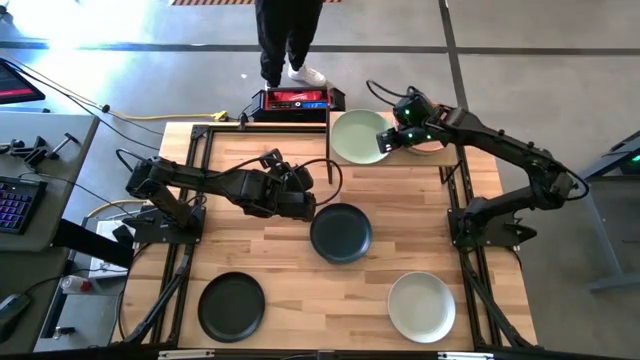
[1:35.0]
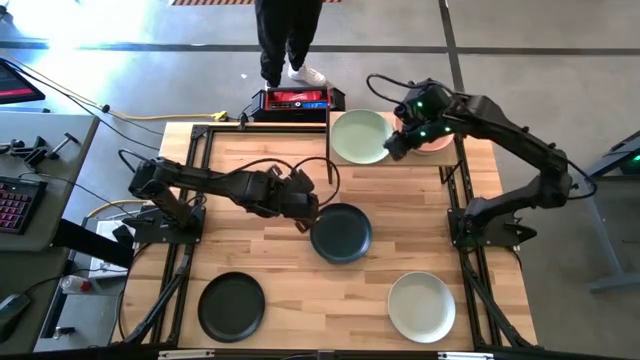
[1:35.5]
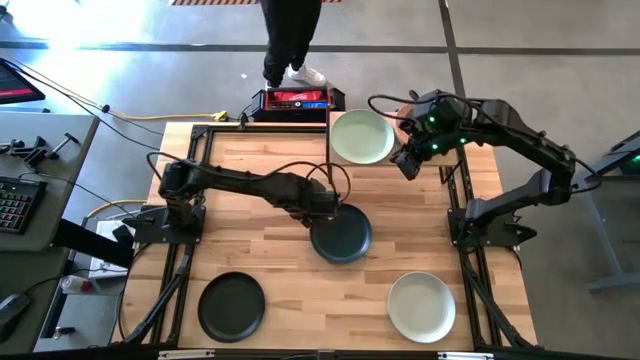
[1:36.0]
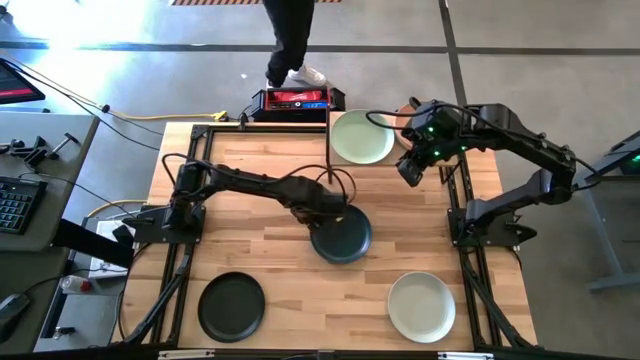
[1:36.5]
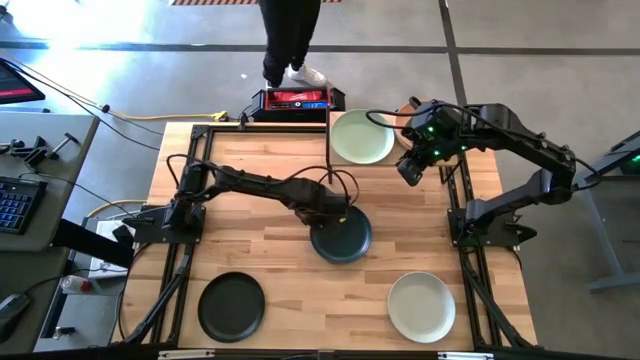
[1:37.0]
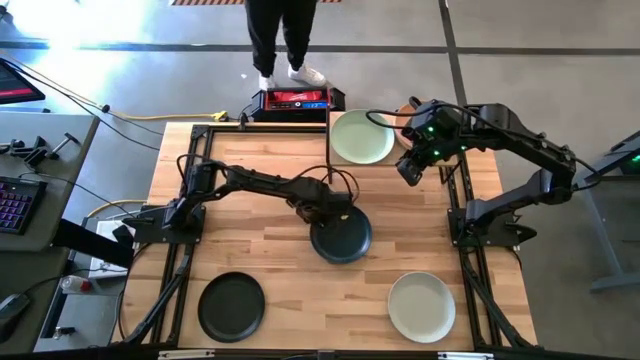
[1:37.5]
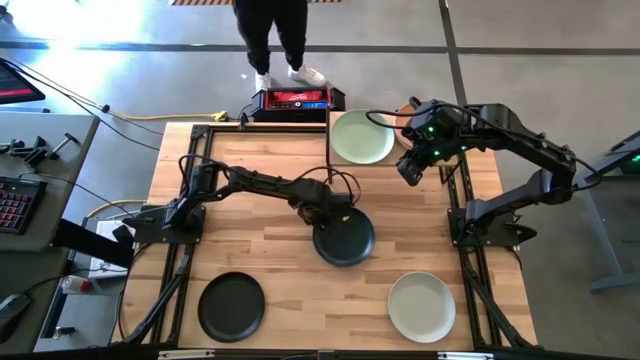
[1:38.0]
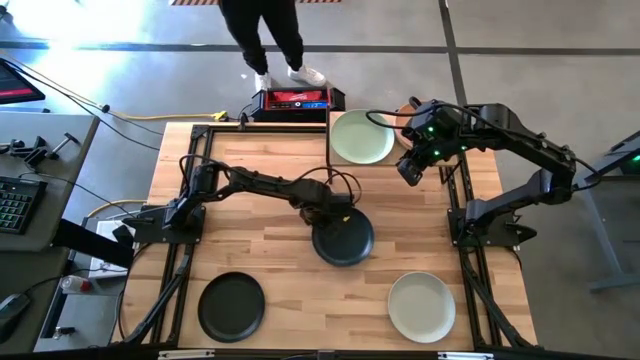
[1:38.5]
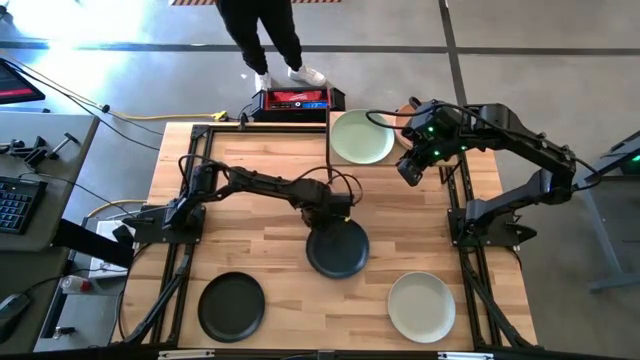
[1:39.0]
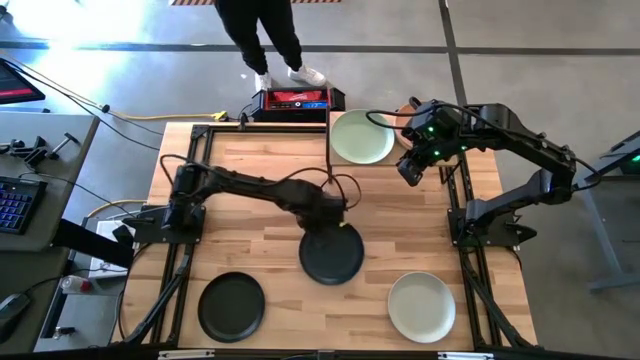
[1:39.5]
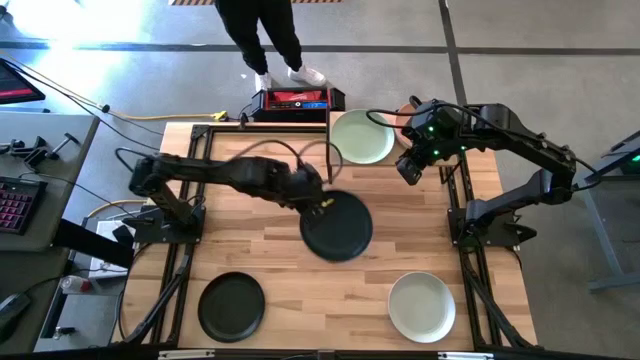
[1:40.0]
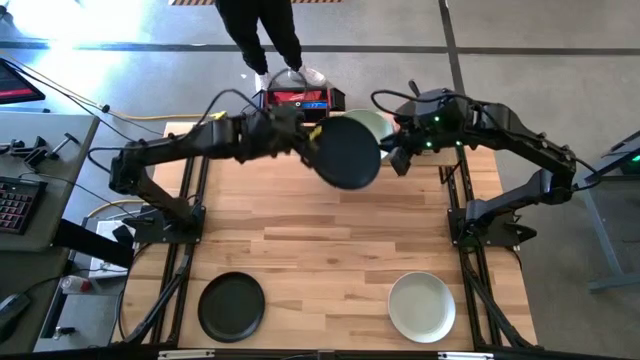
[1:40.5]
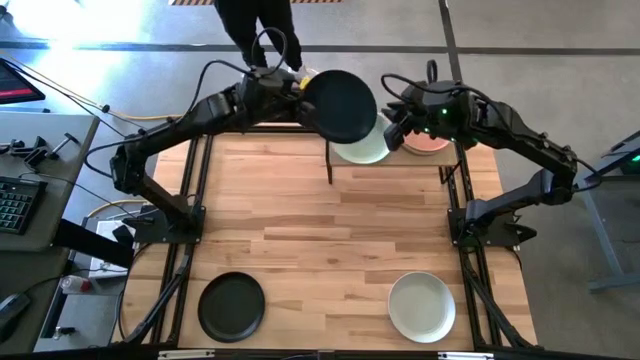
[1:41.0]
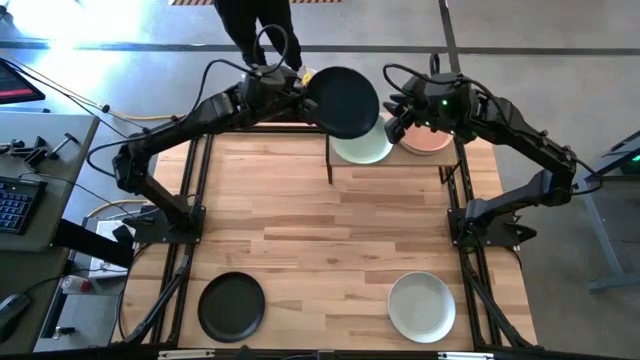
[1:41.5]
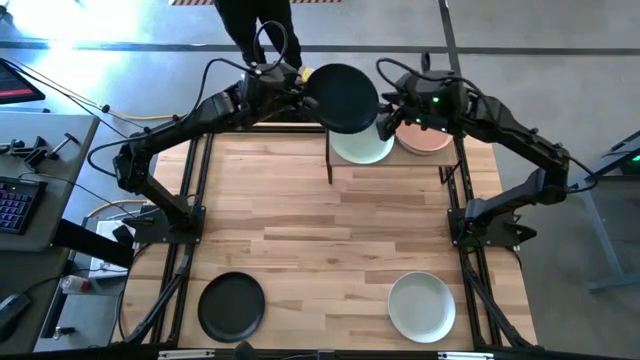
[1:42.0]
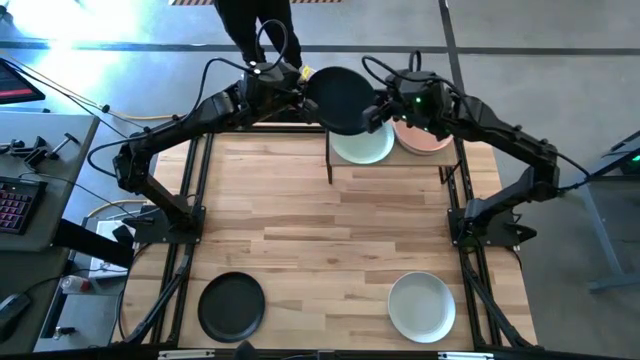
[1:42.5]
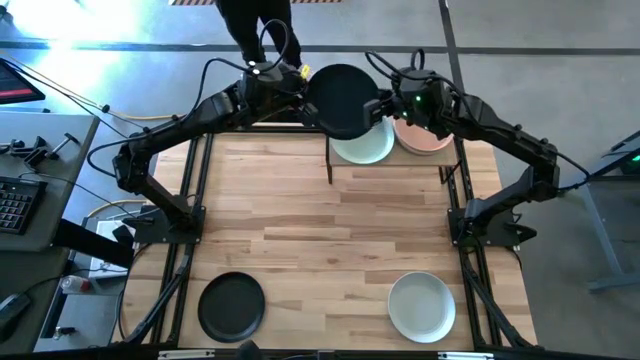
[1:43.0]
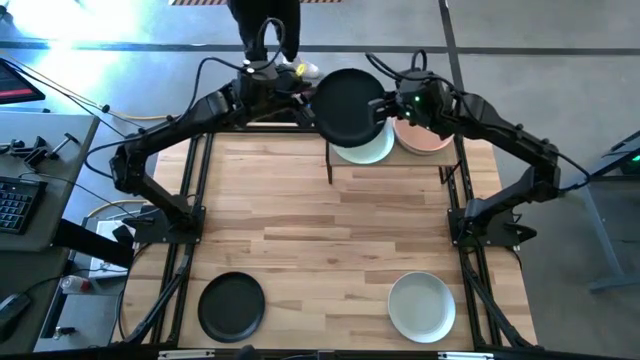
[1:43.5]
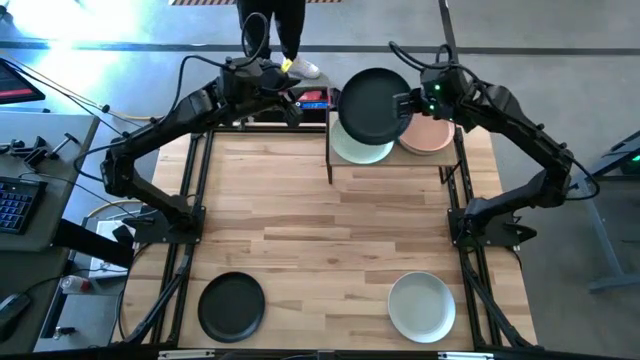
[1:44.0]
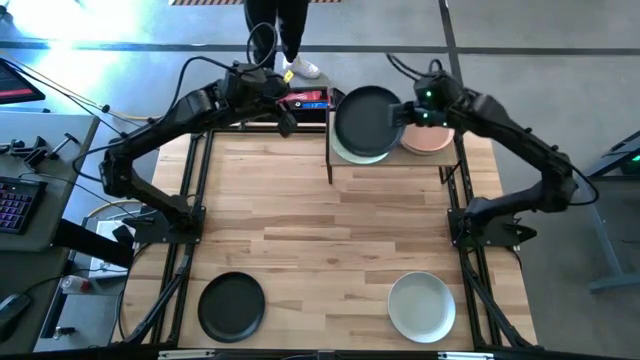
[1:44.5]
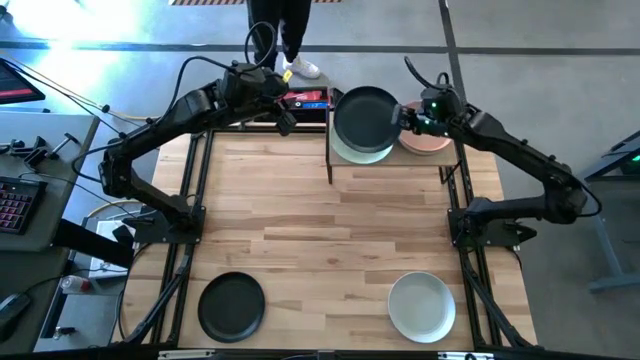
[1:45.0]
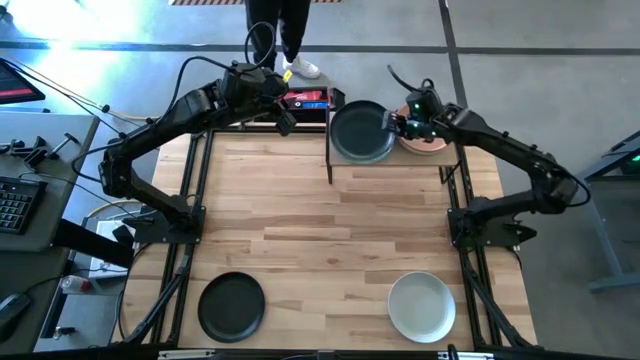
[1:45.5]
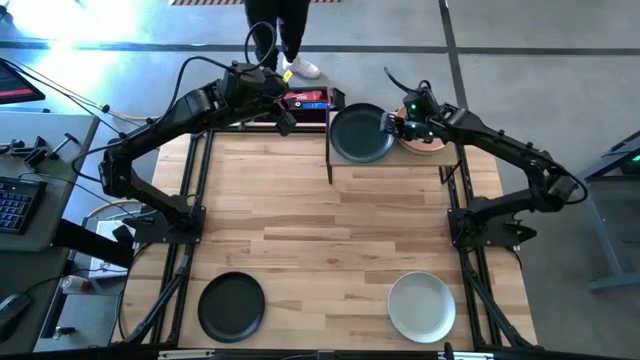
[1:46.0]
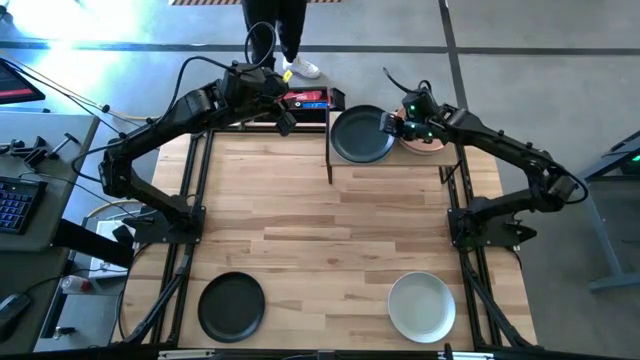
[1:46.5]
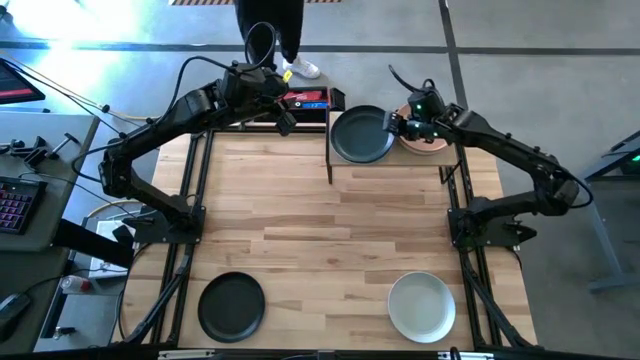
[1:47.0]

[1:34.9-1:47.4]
Task: Place and stack plates onto a shelf
Stack the black plate on the green plate on the shelf

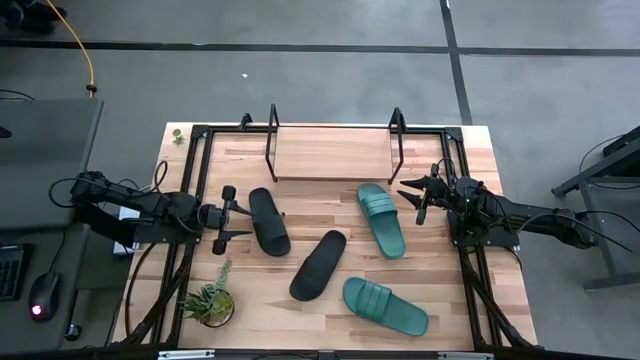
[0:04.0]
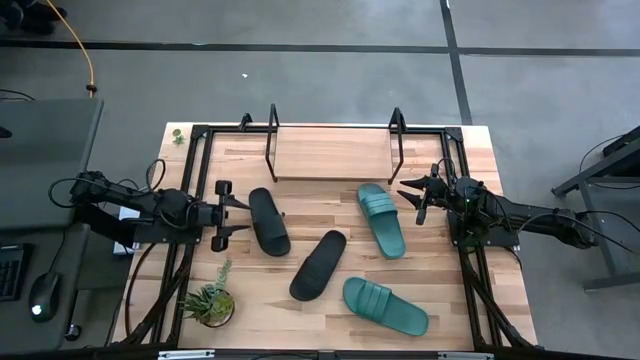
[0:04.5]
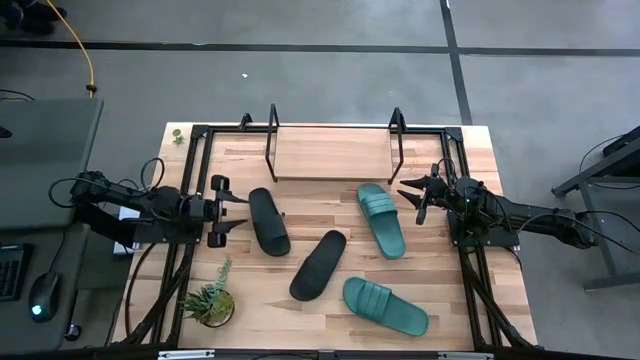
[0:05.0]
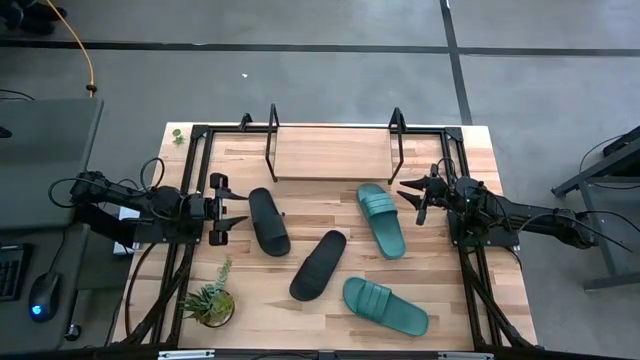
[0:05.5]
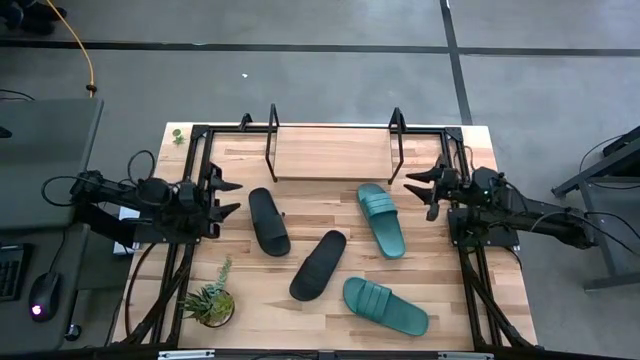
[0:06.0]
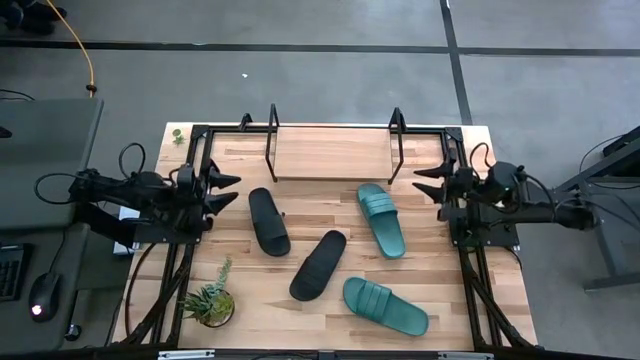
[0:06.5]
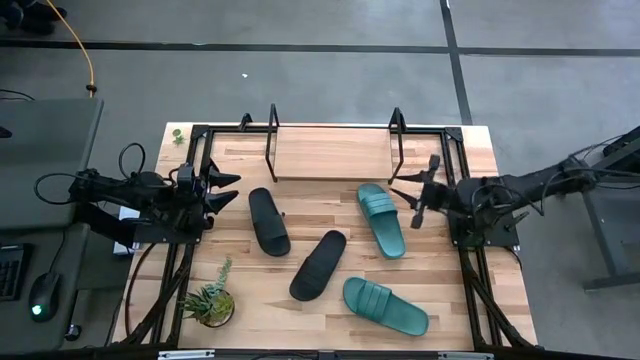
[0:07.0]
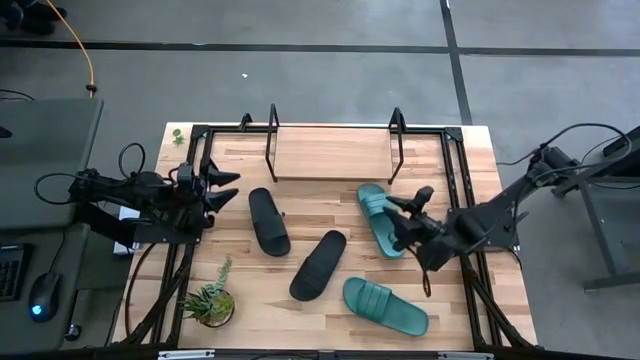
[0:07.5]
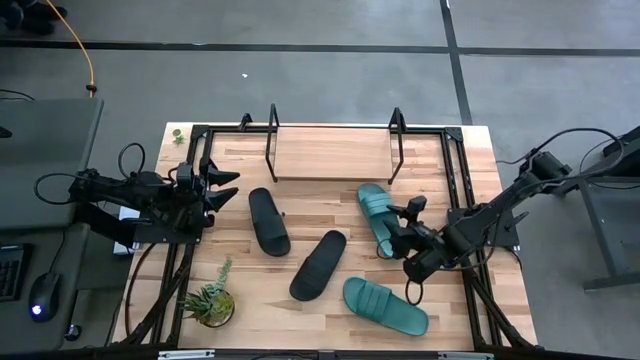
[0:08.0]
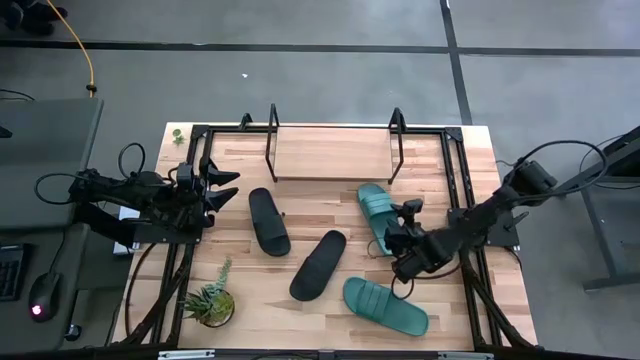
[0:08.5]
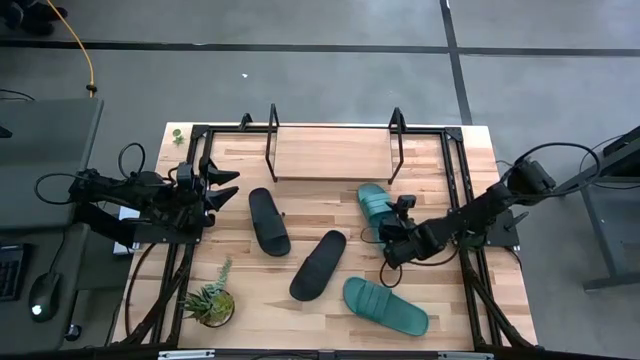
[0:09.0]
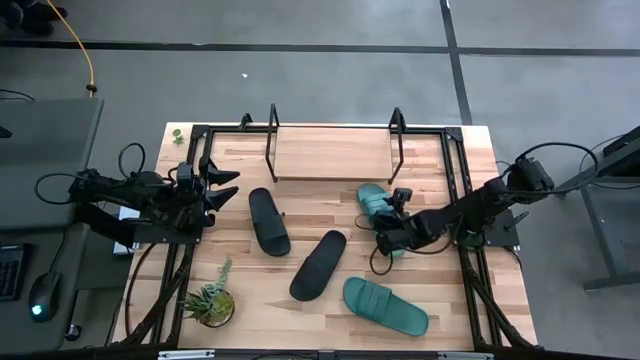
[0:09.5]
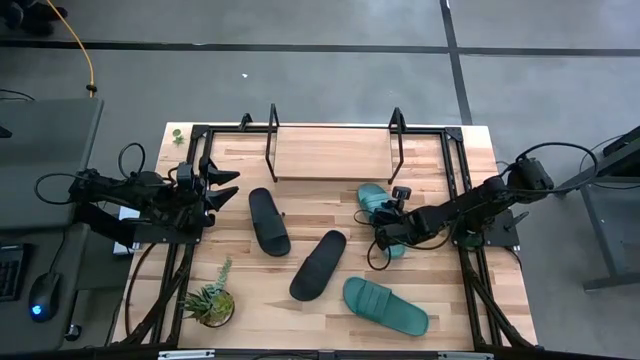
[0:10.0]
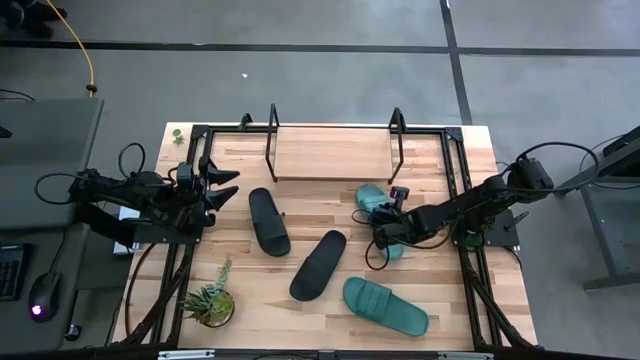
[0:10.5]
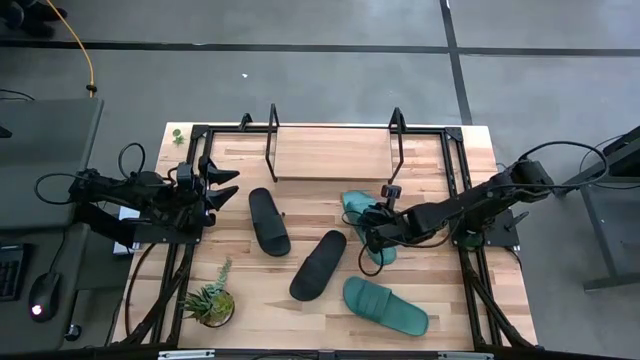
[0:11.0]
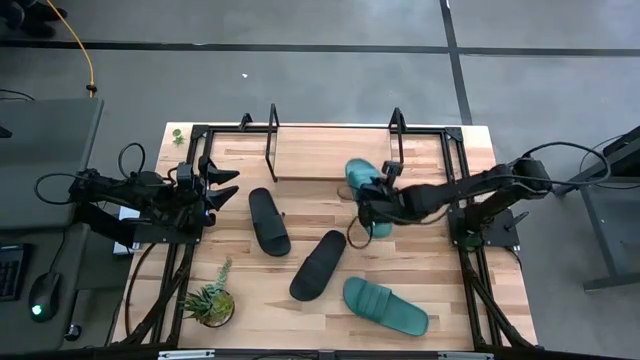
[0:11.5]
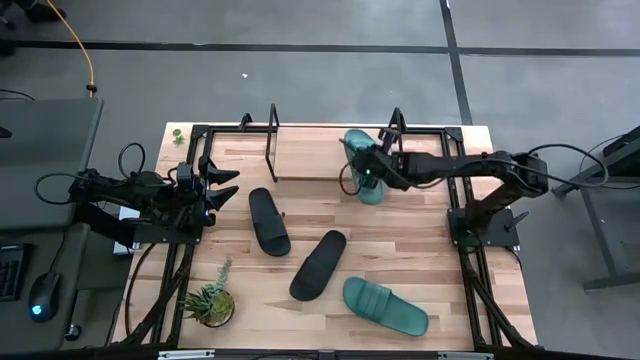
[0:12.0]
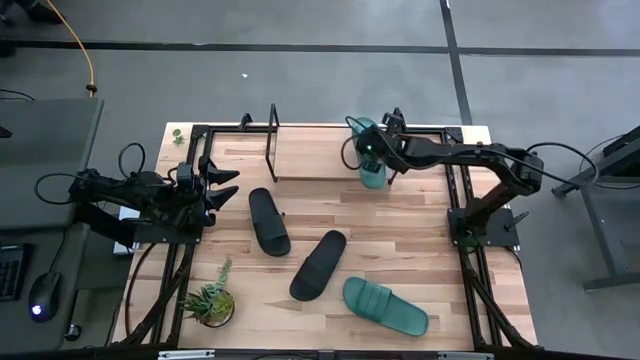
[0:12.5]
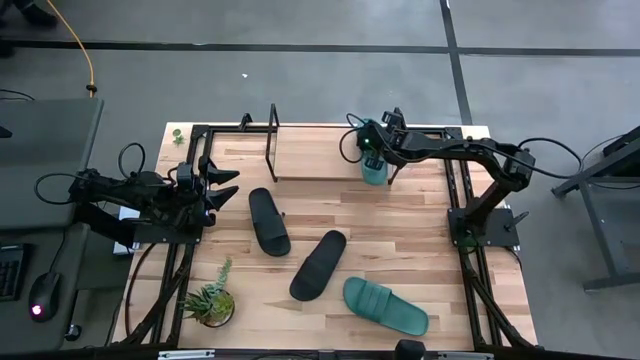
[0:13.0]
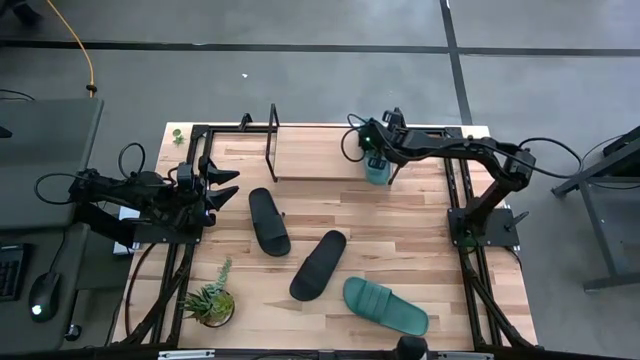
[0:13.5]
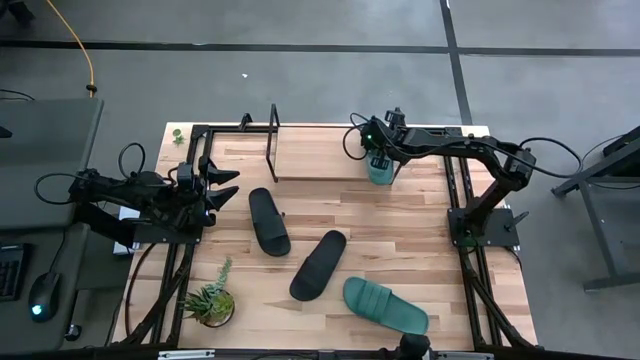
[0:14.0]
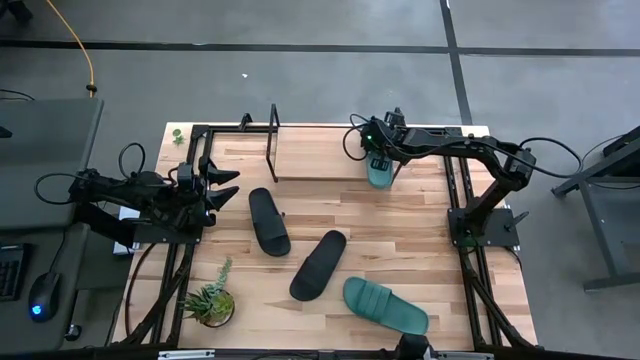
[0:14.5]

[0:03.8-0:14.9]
Task: Pick and place slides into the shelf
Put the right green slide on the shelf
